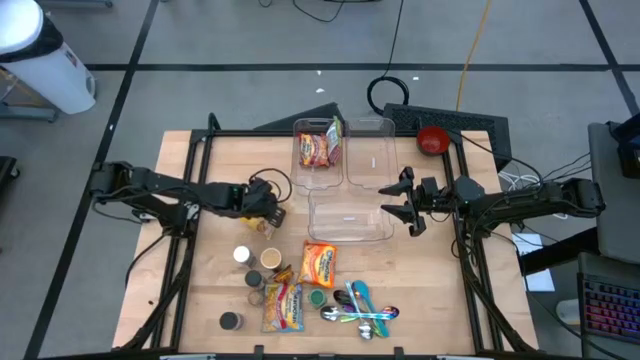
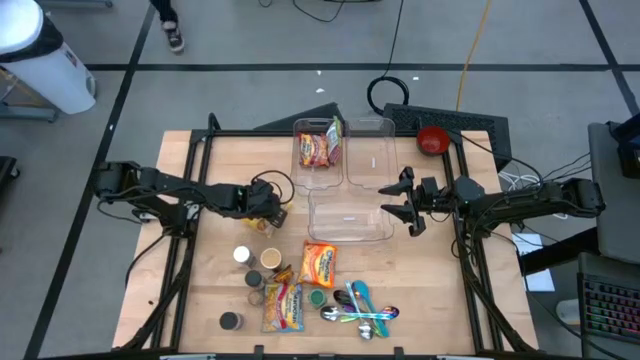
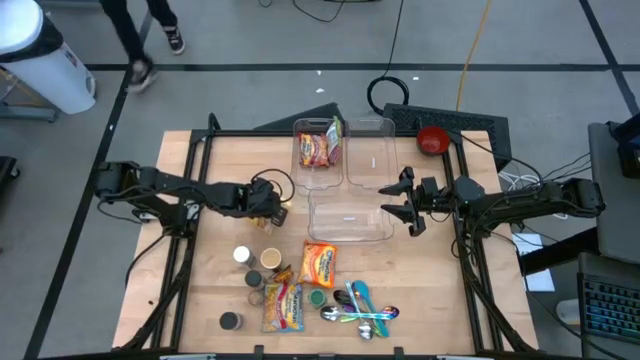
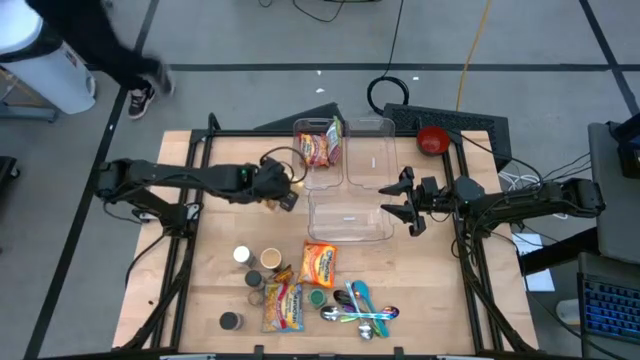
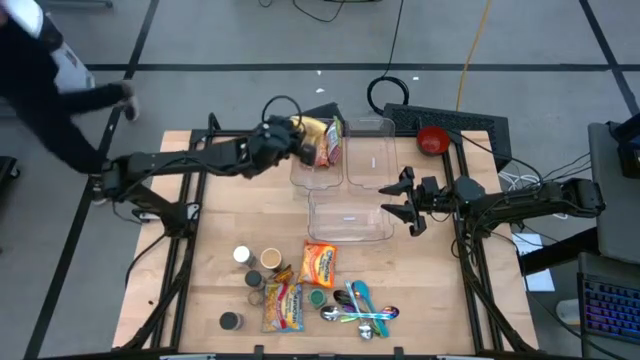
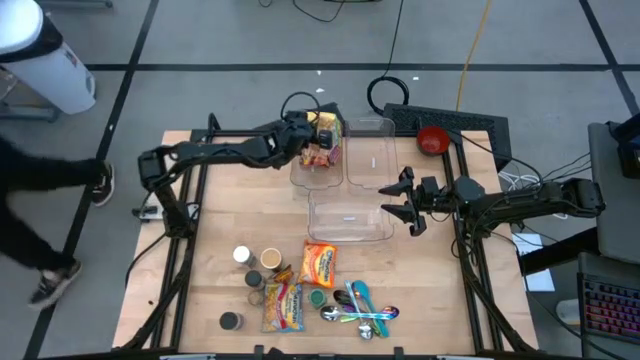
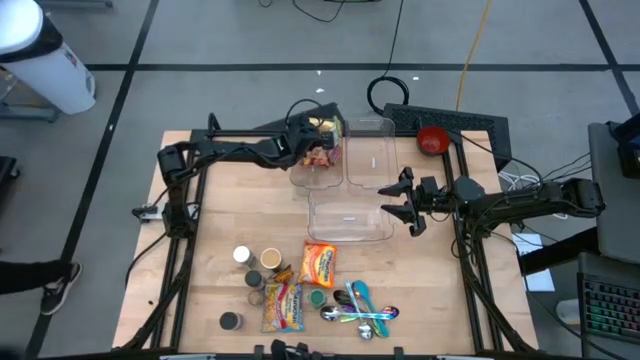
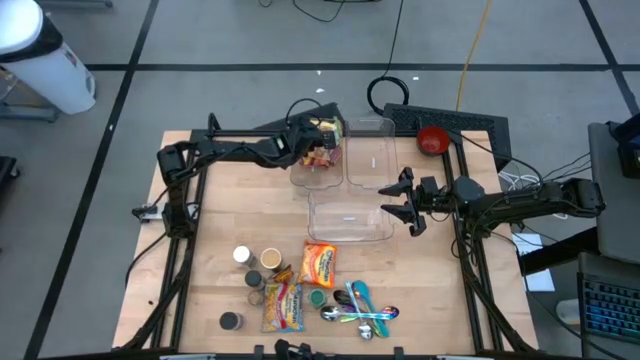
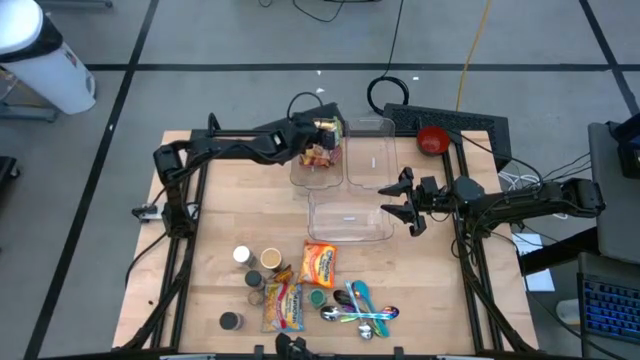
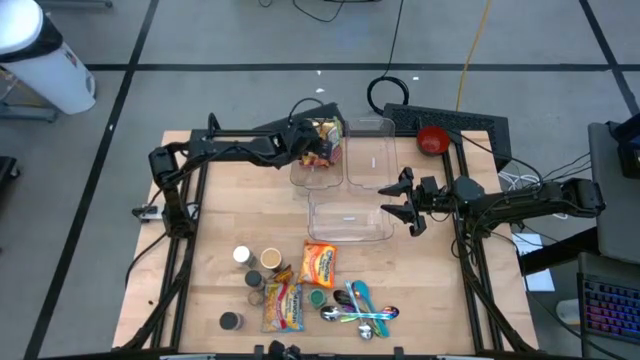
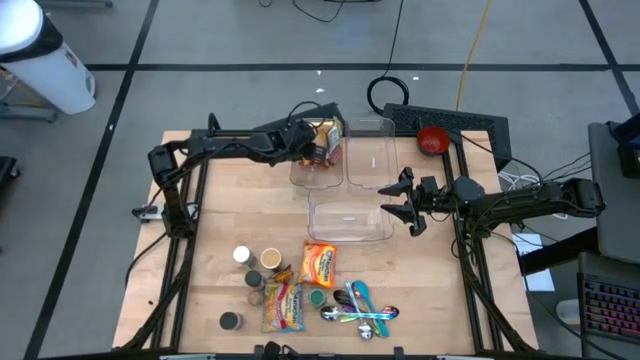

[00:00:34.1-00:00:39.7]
Task: Pick & Place Food Item
Put the yellow noodle pack into the left transparent bin

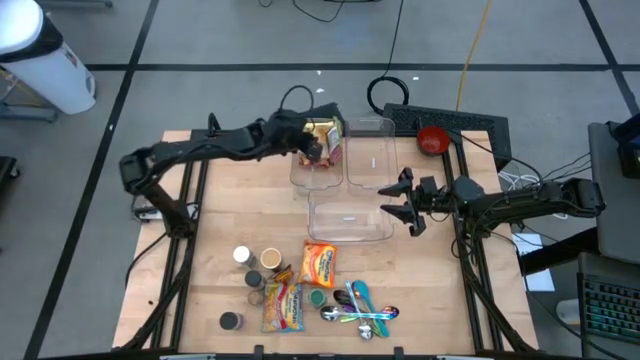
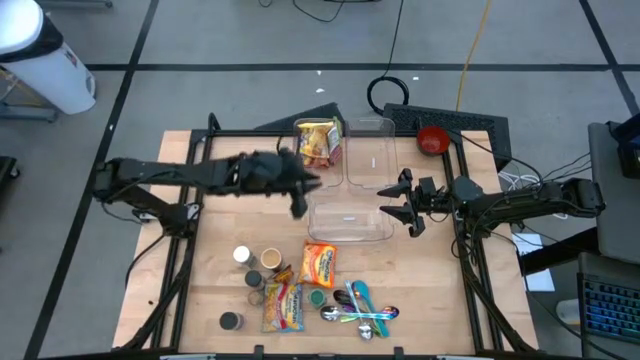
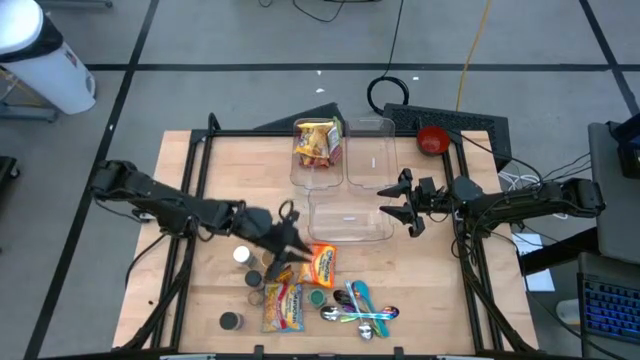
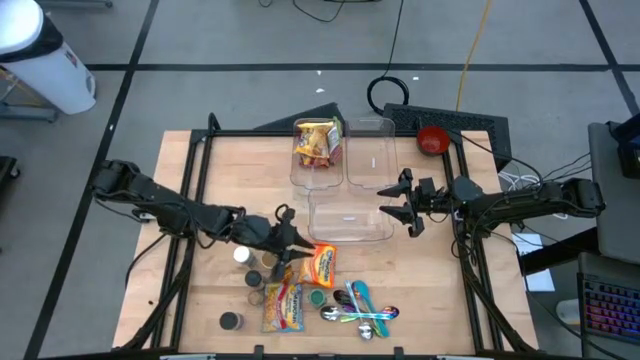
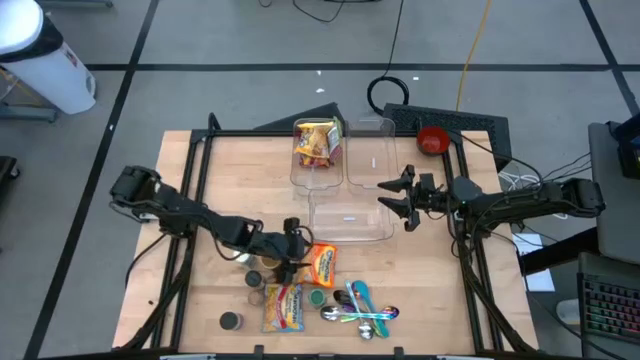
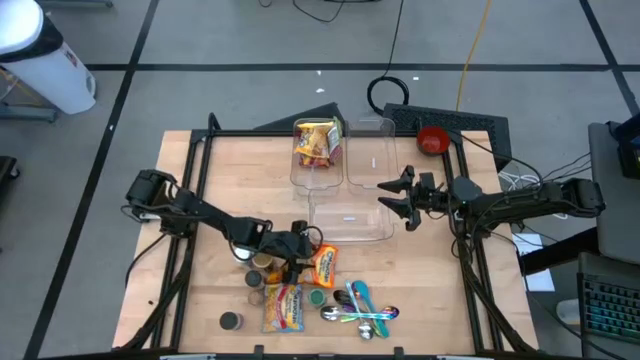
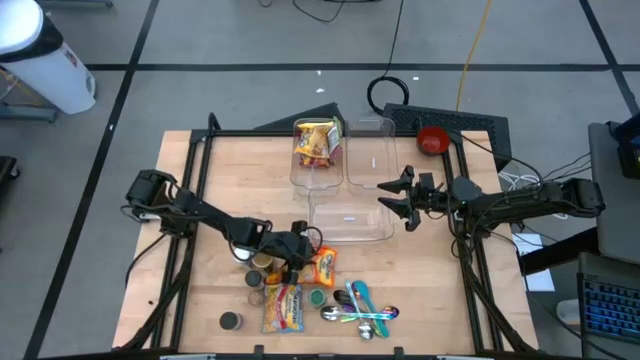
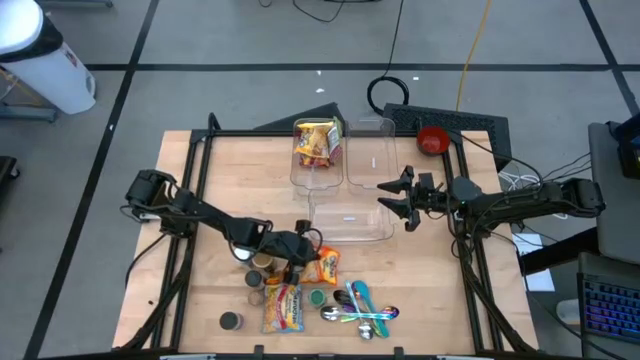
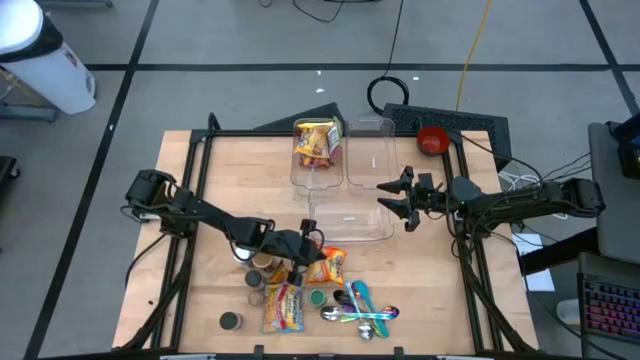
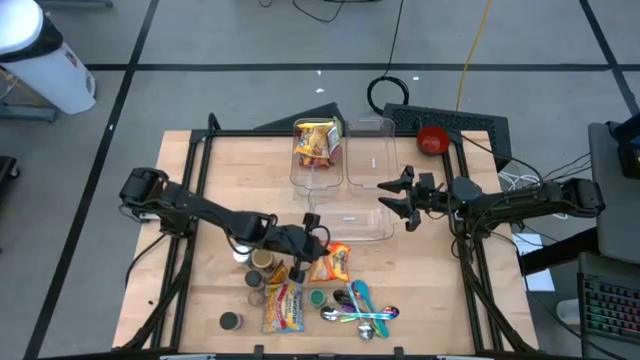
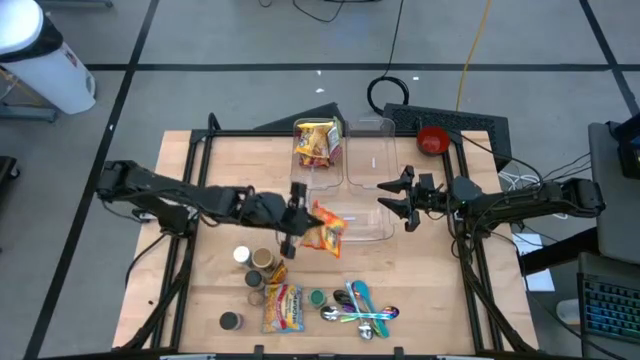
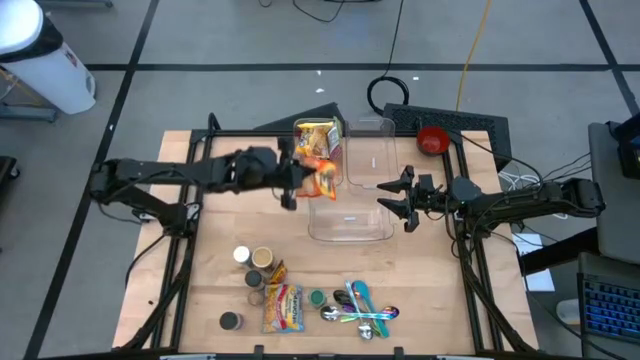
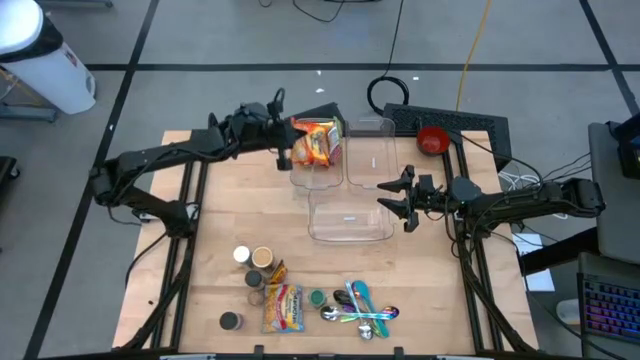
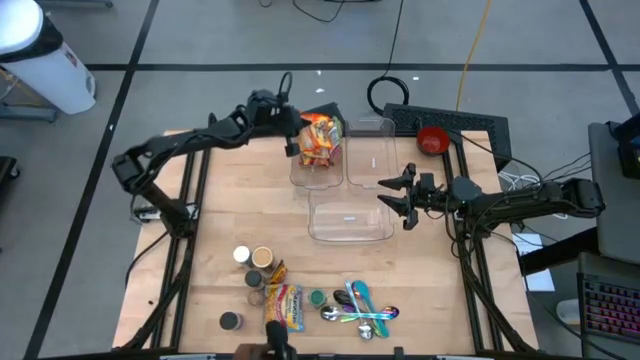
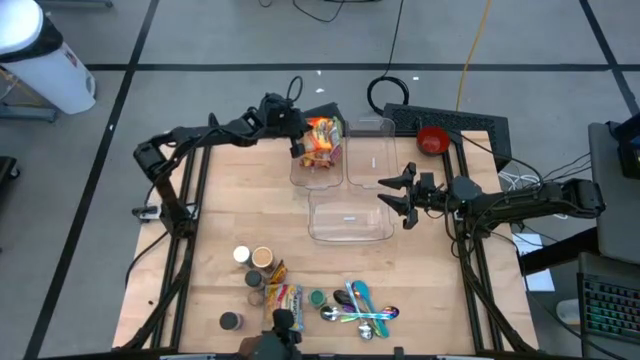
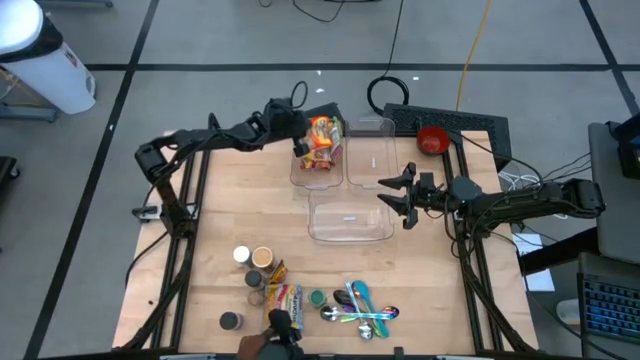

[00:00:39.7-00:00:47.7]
Put the orange noodle pack into the left transparent bin

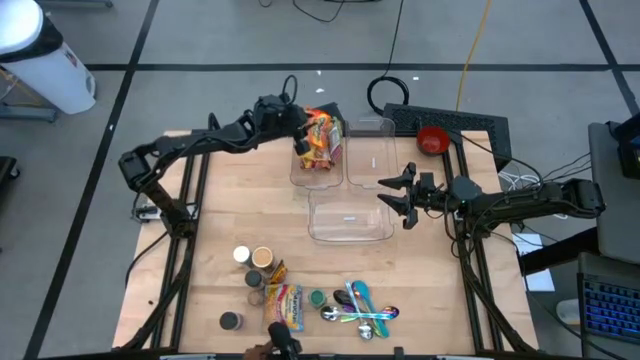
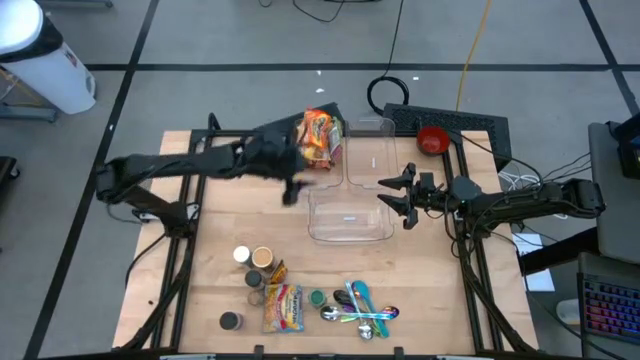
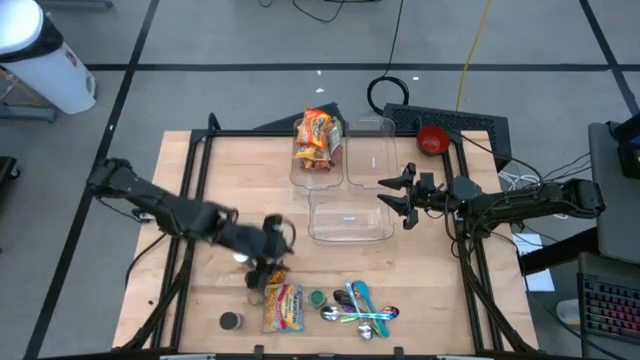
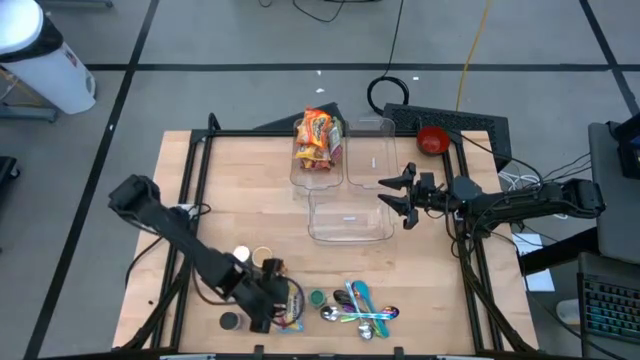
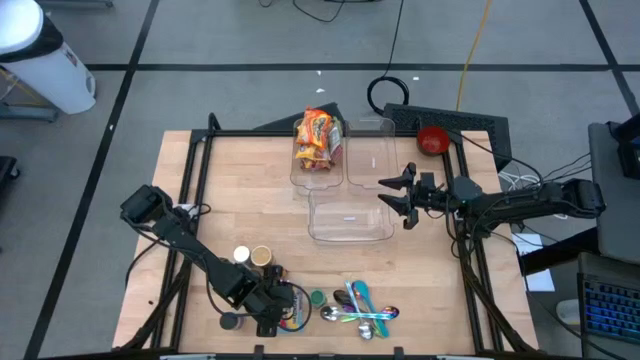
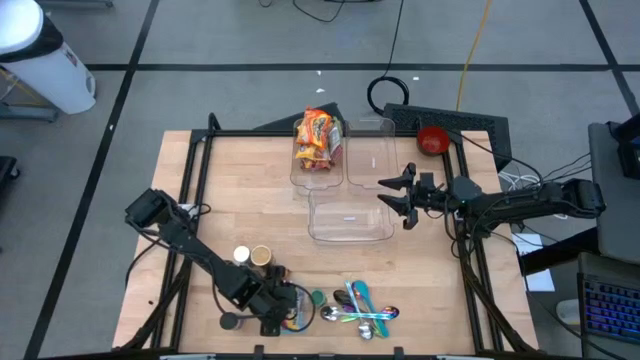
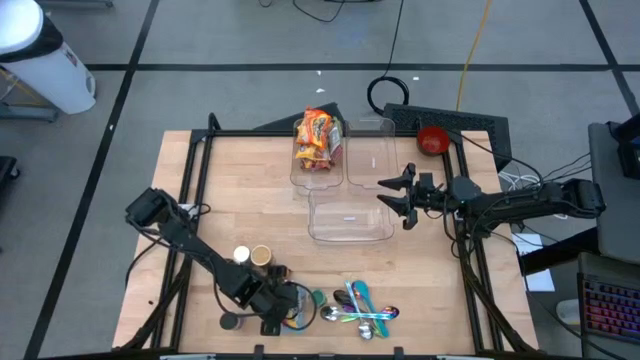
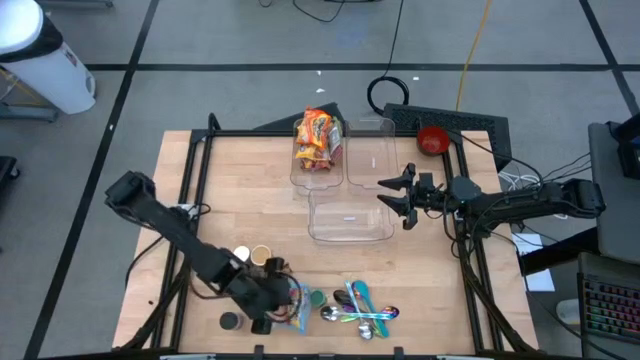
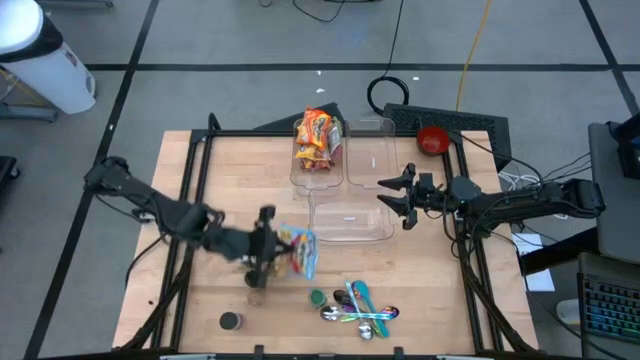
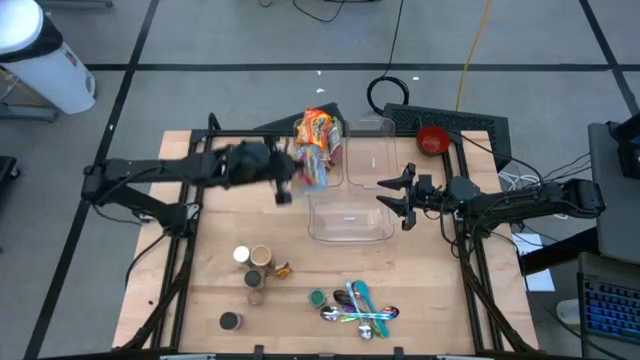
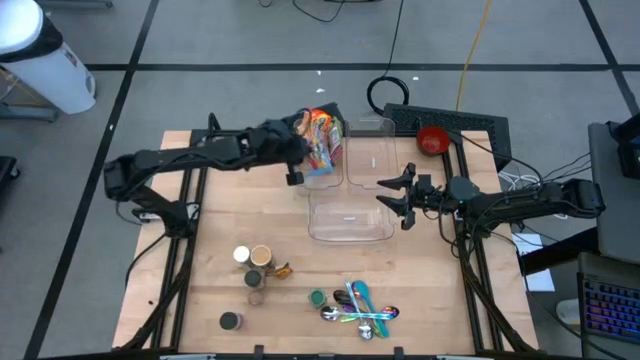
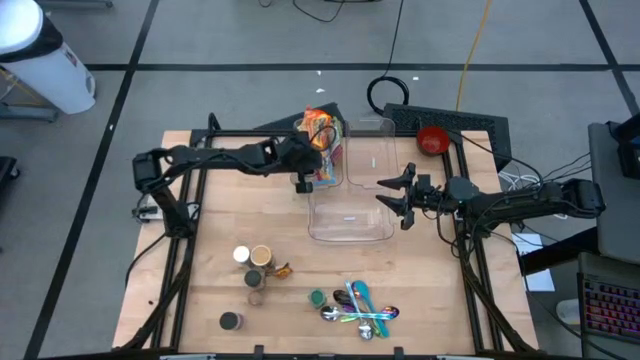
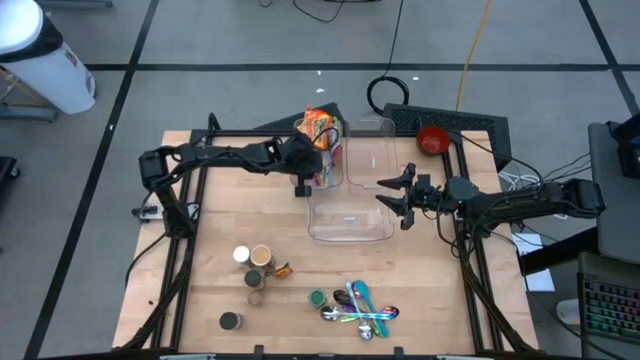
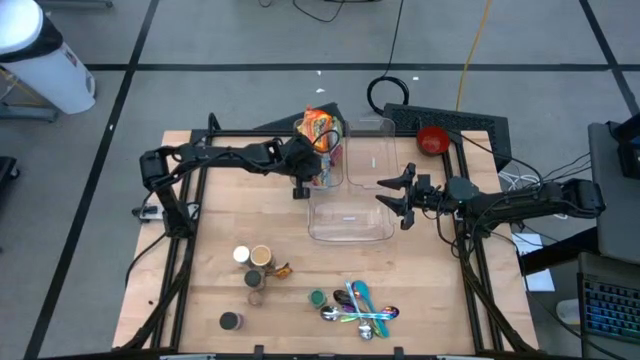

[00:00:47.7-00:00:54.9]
Put the blue noodle pack into the left transparent bin
